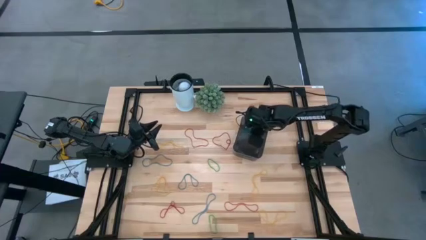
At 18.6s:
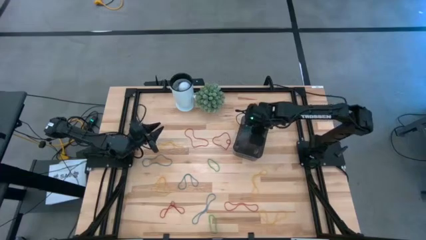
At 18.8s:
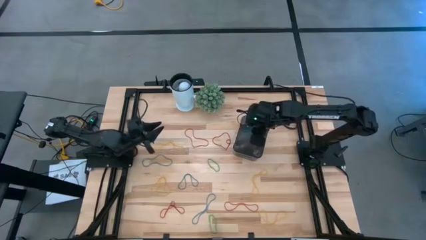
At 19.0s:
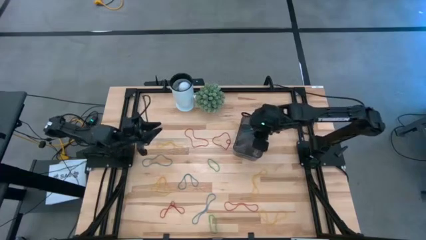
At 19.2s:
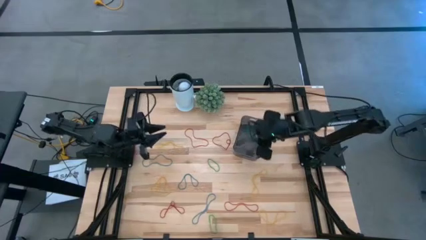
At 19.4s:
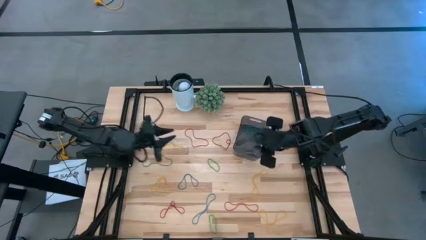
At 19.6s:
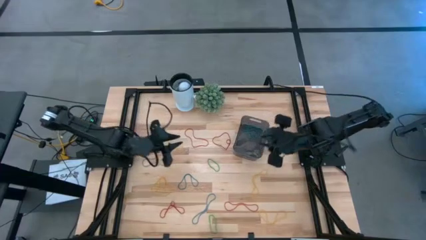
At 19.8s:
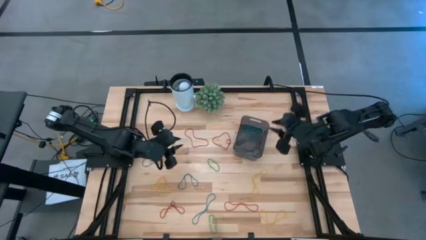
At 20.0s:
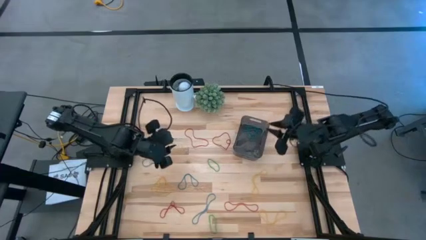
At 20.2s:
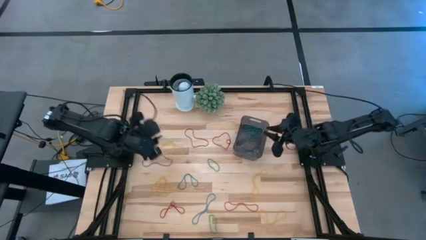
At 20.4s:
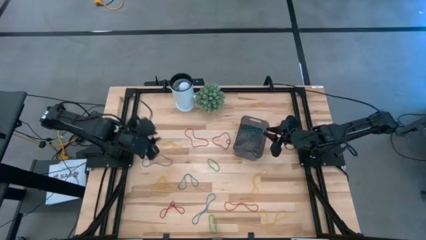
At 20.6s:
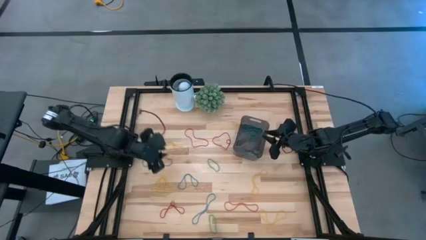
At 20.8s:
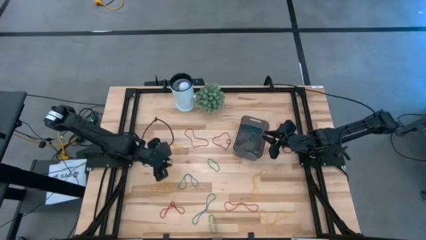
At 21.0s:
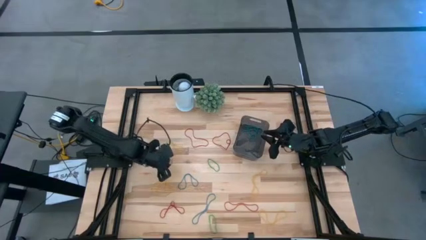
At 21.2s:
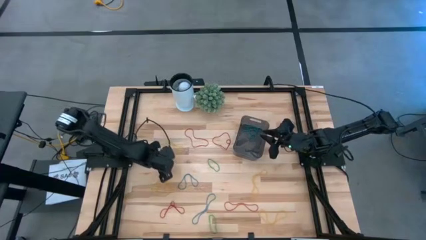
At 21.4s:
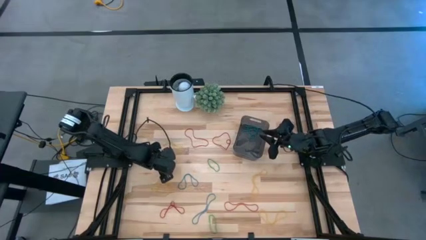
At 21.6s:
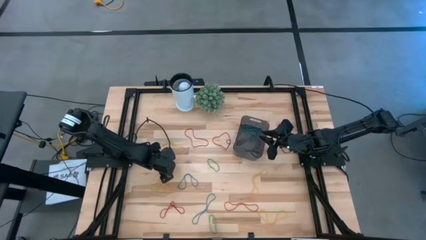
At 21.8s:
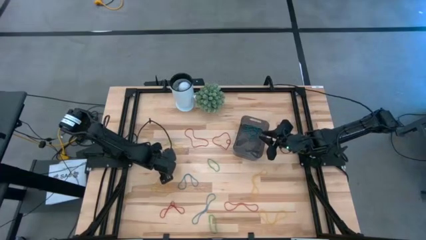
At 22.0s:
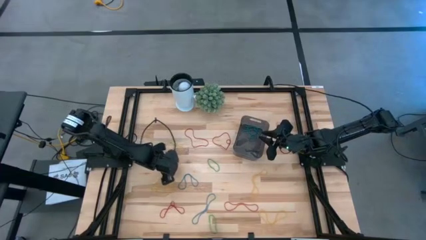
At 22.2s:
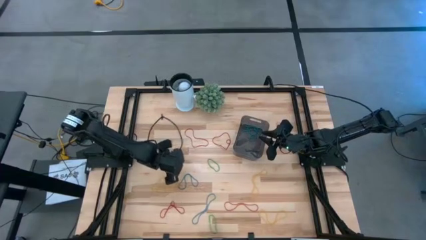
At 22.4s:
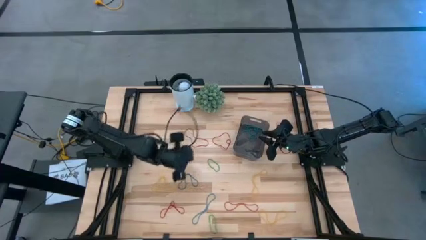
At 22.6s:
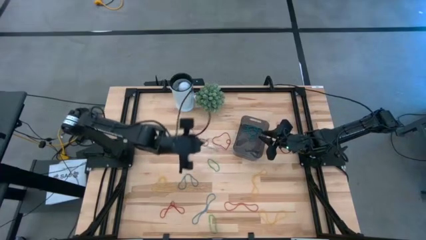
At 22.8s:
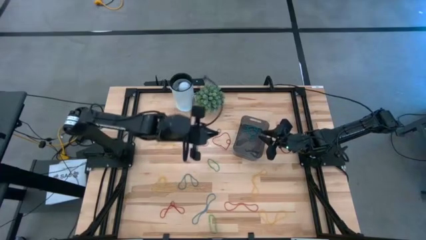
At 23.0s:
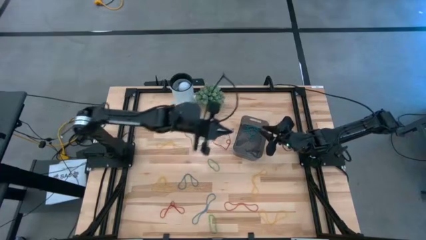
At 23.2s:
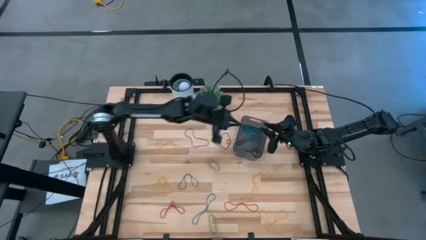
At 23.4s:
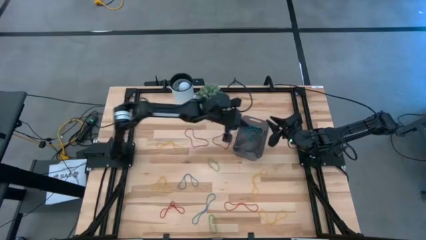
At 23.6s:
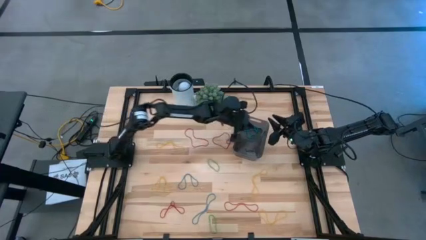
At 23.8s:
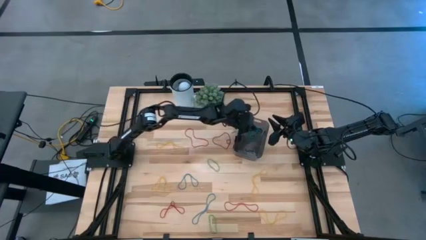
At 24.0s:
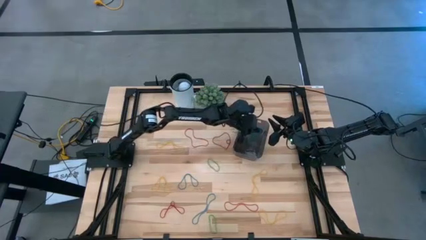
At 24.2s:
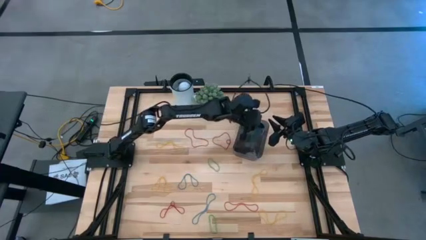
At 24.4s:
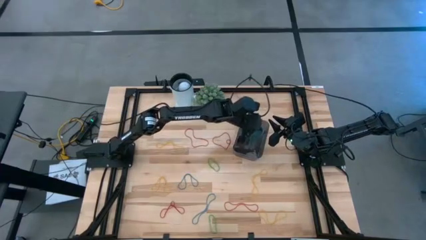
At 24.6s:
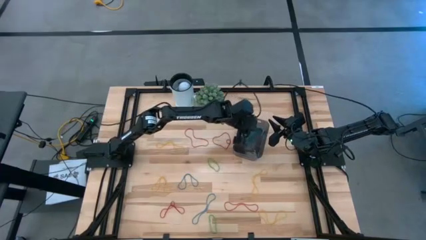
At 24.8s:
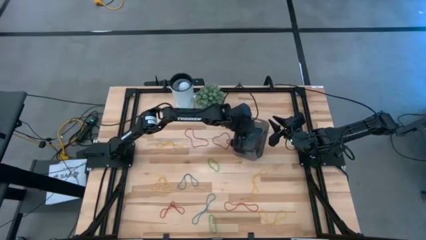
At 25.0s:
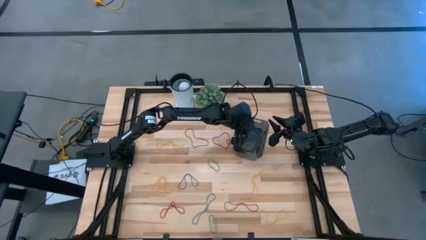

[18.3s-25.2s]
Task: Pick and place items into bin
Put the blue rubber band into the black bin

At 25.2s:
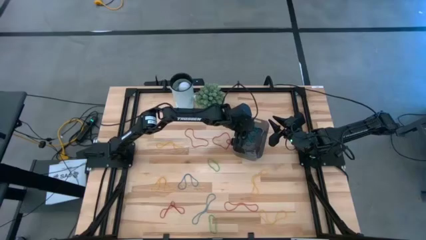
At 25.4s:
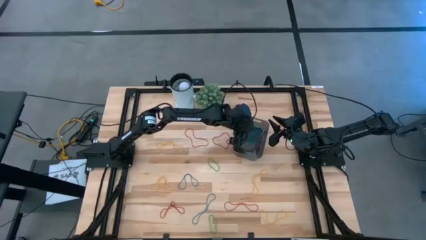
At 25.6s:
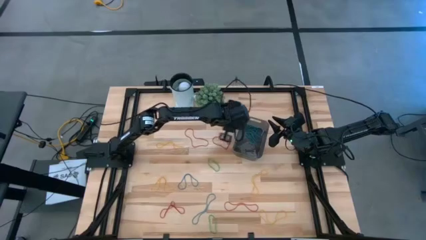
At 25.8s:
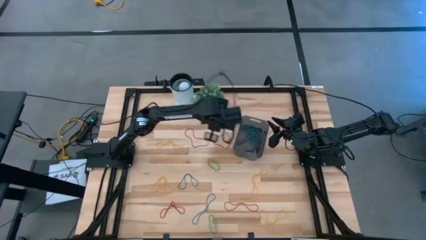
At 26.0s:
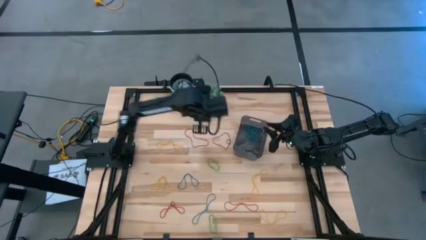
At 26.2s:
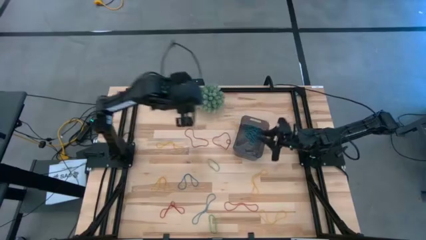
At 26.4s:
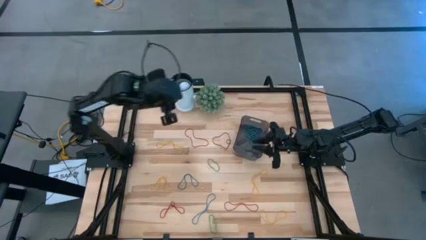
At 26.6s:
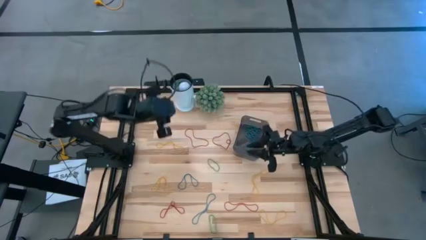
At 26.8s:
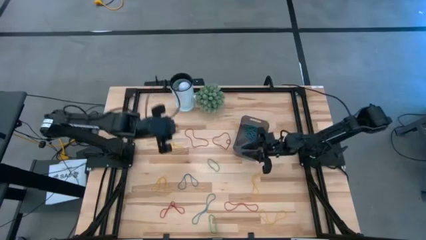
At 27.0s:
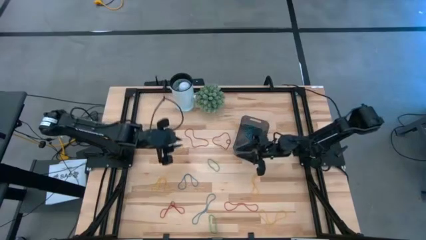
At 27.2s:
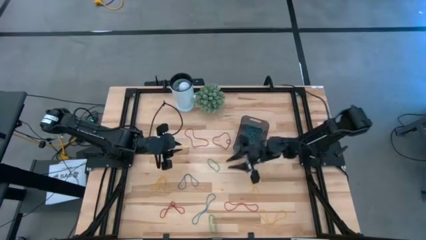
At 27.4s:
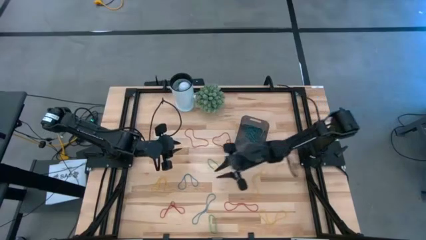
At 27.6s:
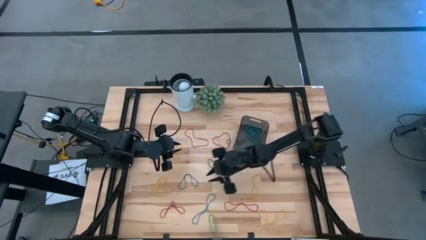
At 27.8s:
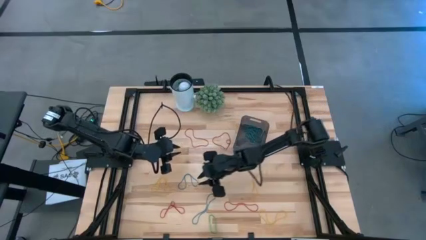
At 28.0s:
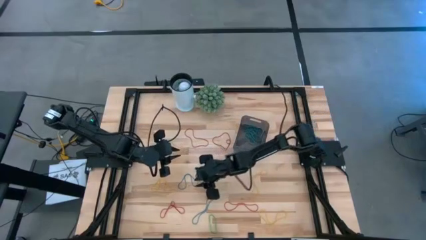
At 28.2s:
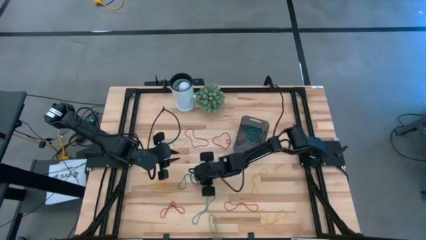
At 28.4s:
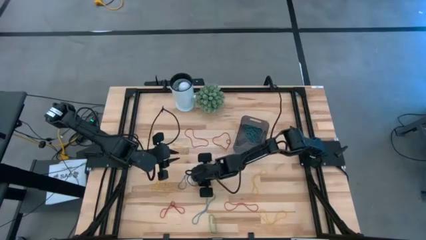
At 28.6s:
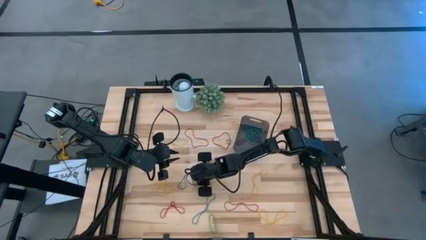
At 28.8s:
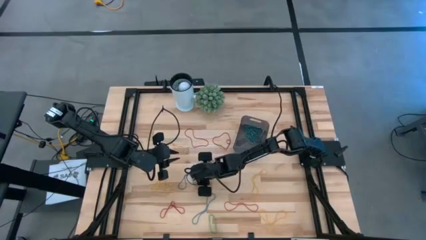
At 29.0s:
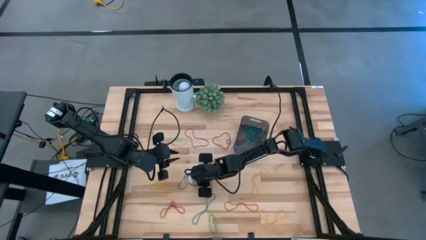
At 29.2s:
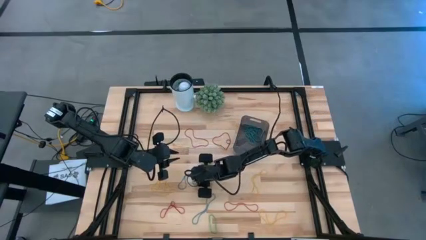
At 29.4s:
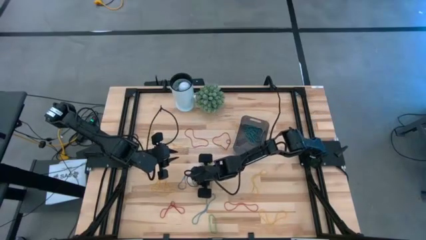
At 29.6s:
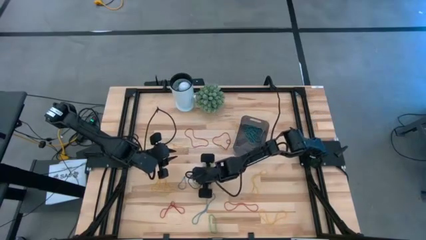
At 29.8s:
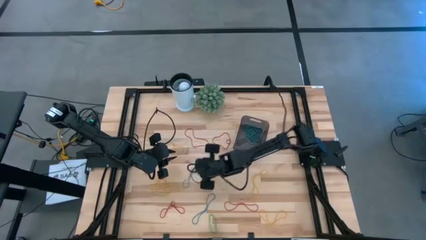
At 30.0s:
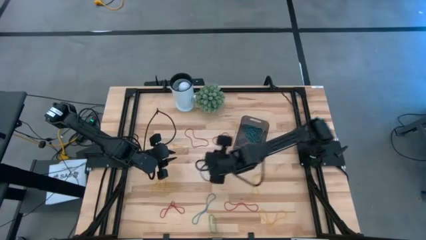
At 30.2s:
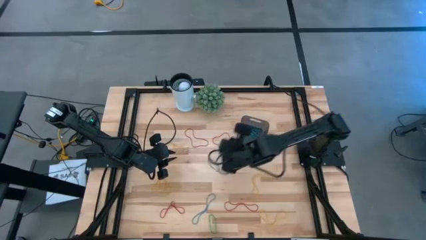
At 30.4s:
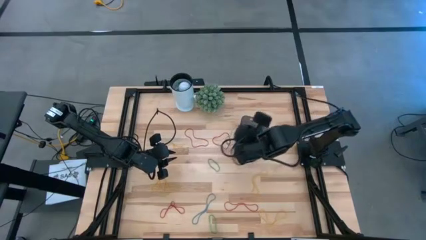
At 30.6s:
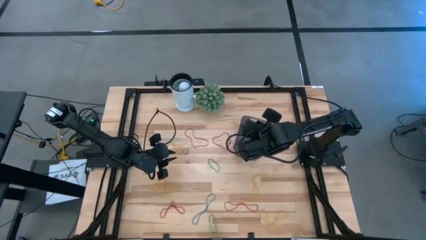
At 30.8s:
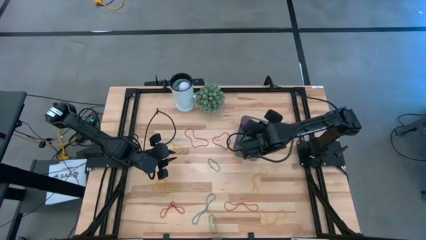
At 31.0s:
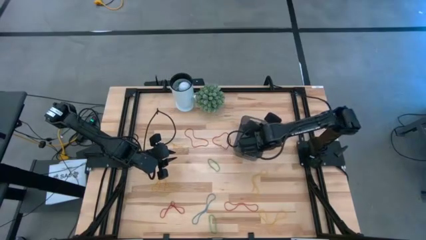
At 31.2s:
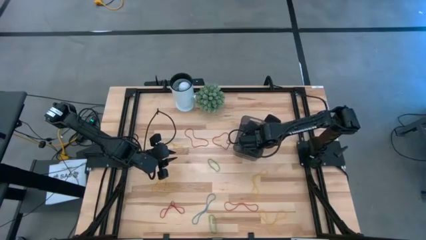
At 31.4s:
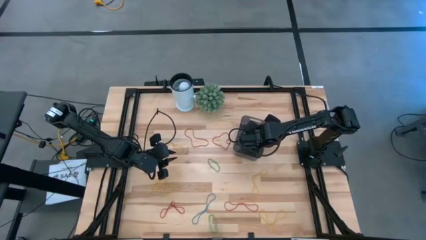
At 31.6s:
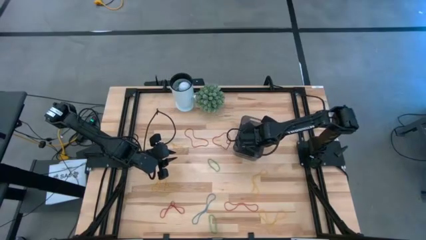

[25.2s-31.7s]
Put the blue rubber band into the black bin

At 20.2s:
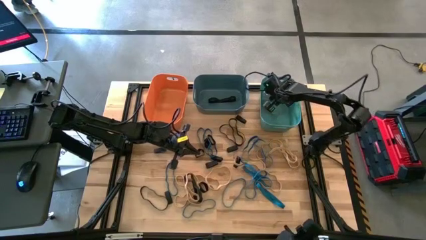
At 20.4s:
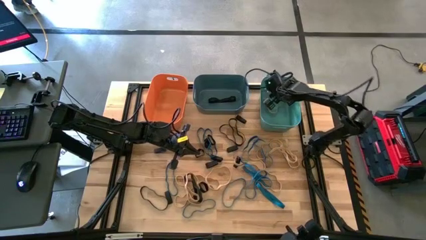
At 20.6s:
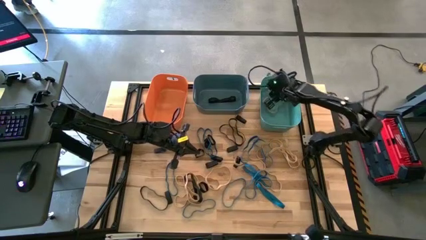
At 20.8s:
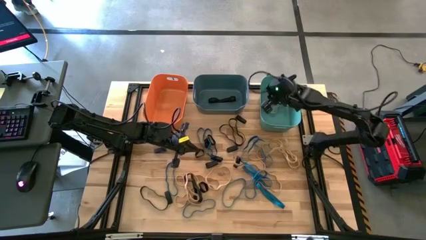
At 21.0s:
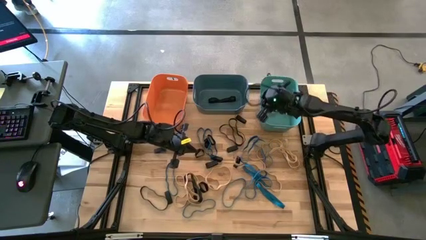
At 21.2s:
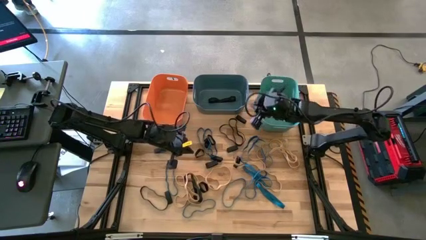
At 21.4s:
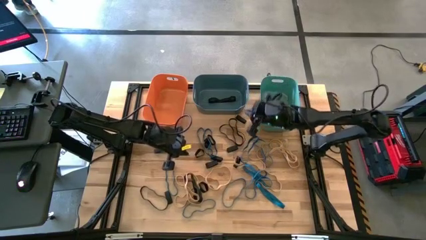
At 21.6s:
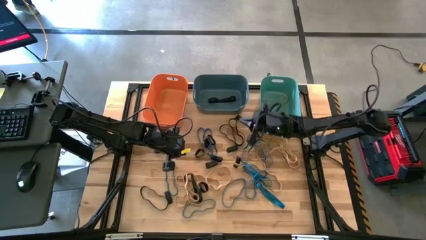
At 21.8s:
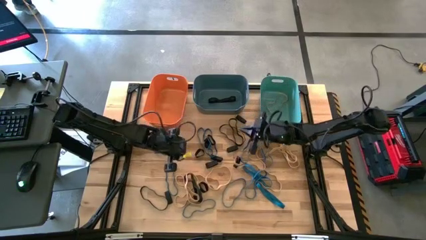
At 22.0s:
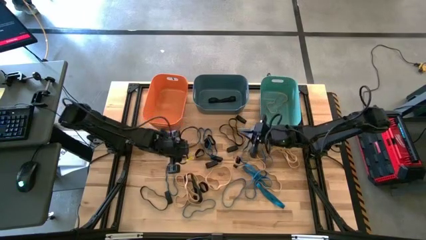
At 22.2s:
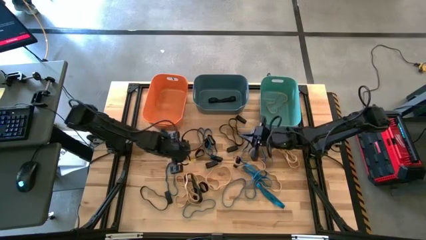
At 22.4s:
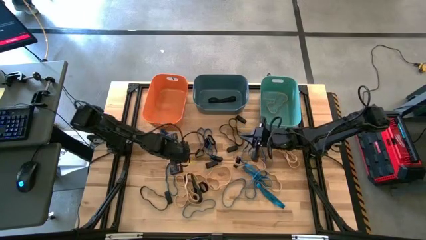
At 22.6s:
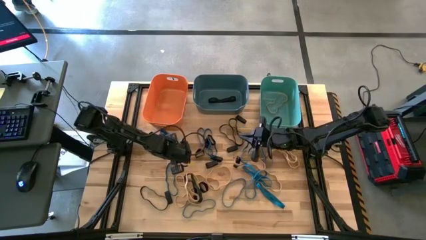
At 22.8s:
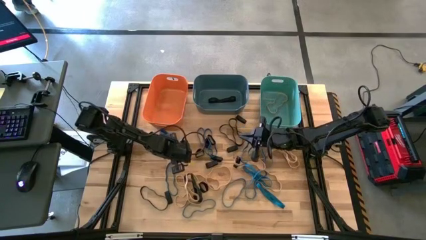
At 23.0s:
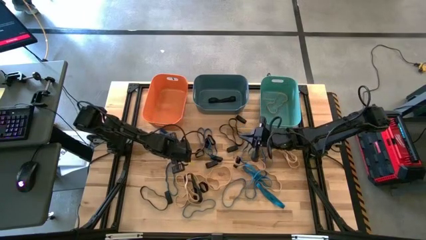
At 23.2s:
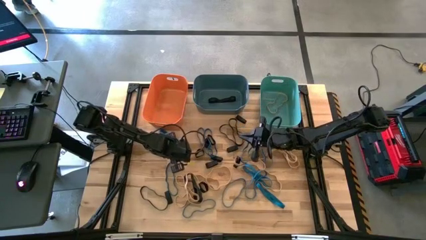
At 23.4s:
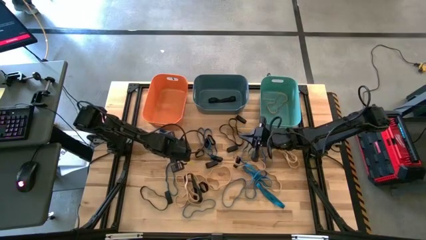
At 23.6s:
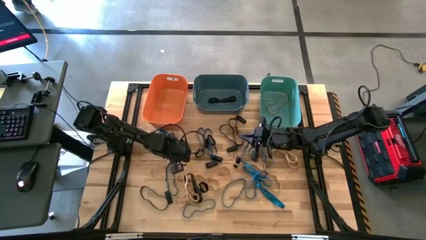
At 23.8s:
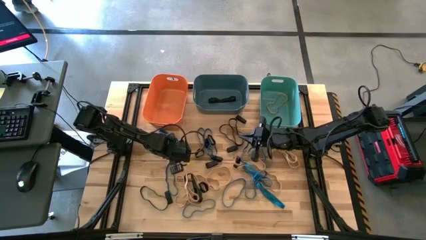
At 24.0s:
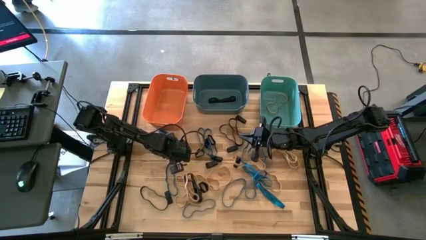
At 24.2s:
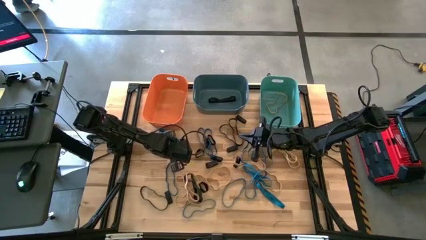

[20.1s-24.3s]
Task: Sort rubber bands into baskets
Put the blue rubber band into the orange bin
